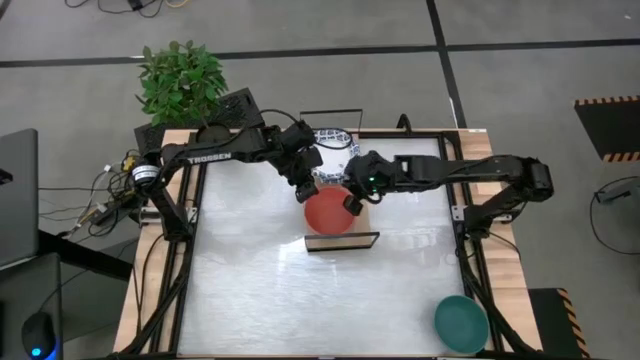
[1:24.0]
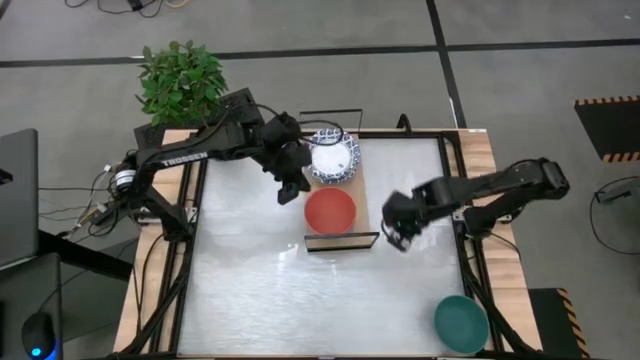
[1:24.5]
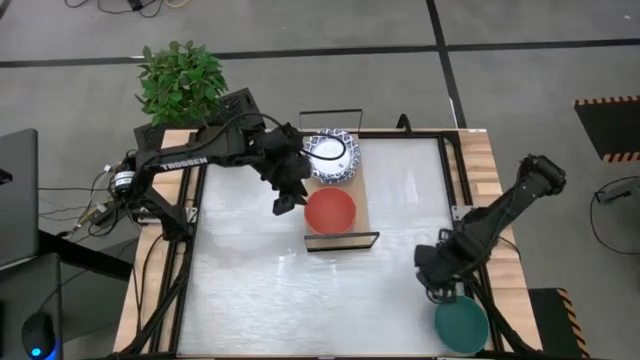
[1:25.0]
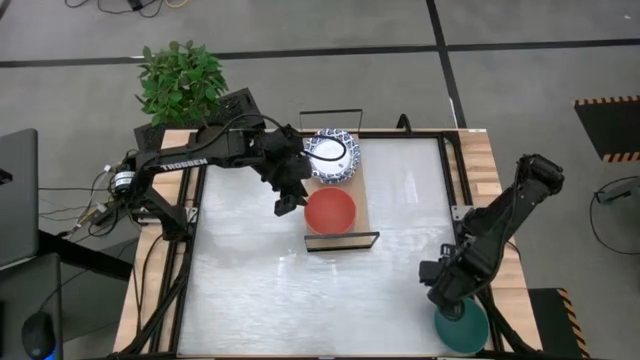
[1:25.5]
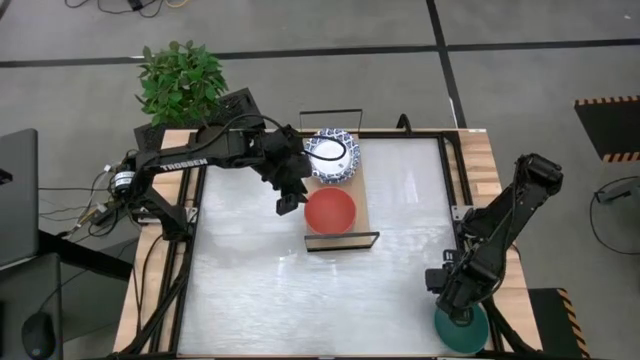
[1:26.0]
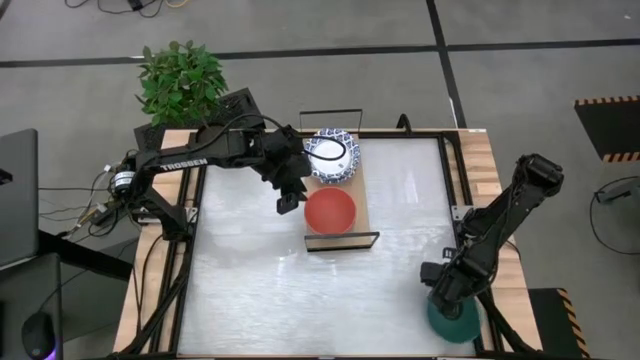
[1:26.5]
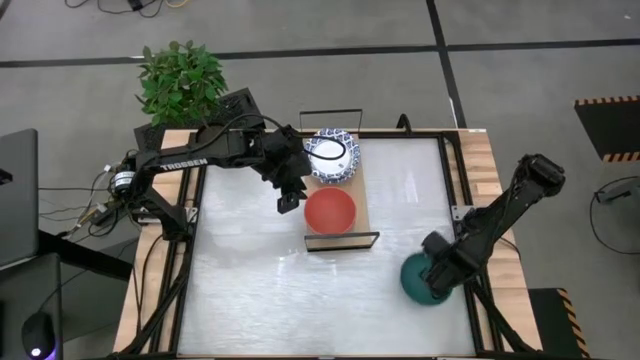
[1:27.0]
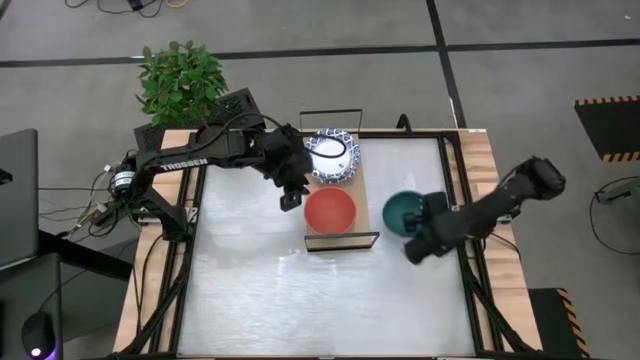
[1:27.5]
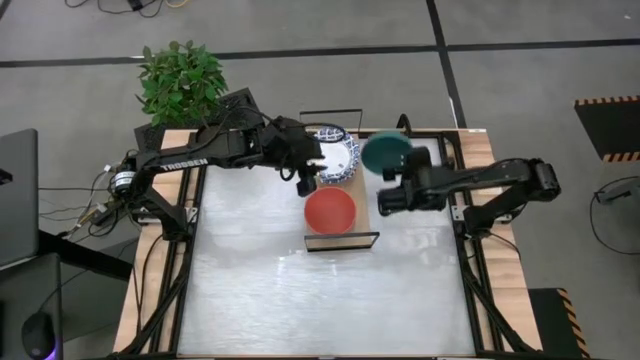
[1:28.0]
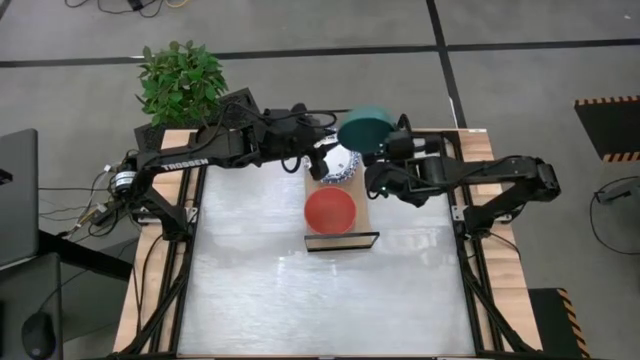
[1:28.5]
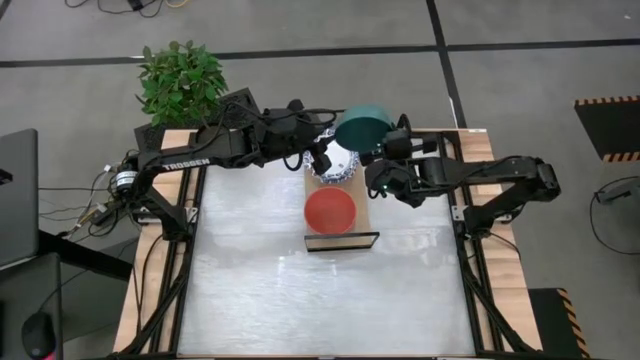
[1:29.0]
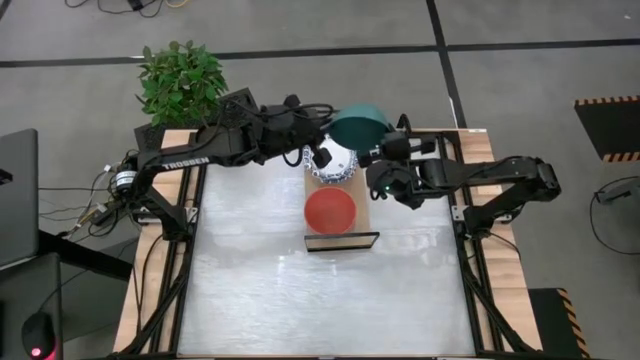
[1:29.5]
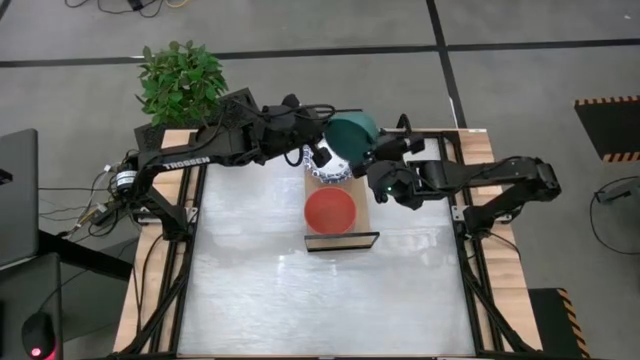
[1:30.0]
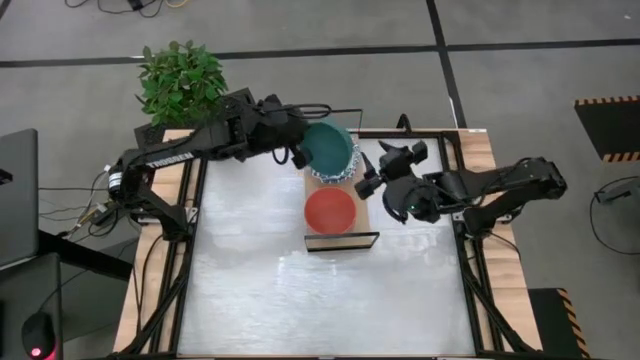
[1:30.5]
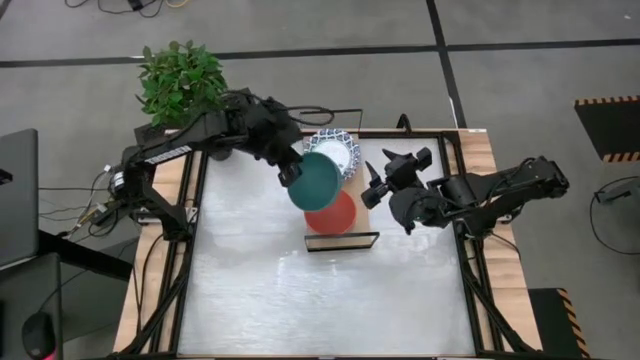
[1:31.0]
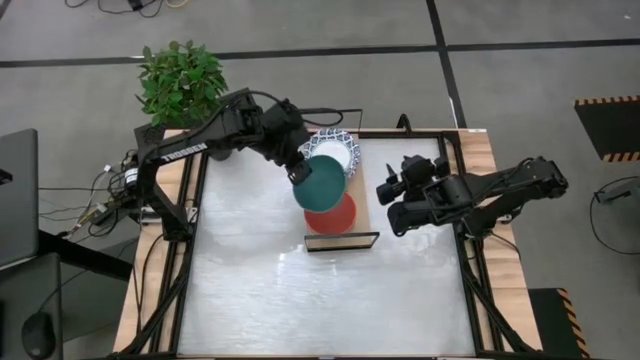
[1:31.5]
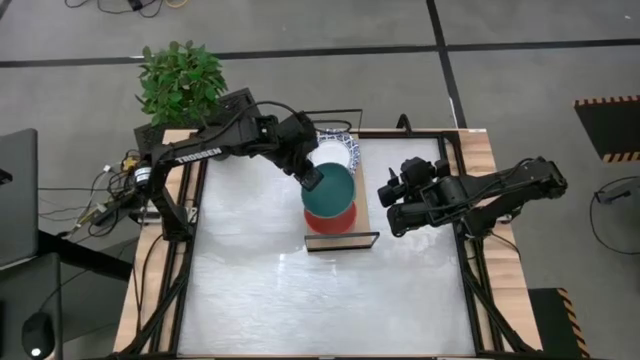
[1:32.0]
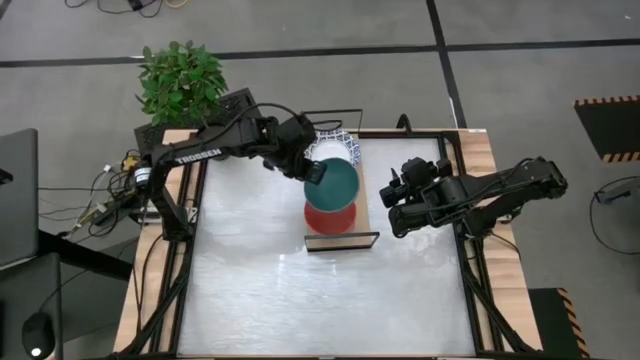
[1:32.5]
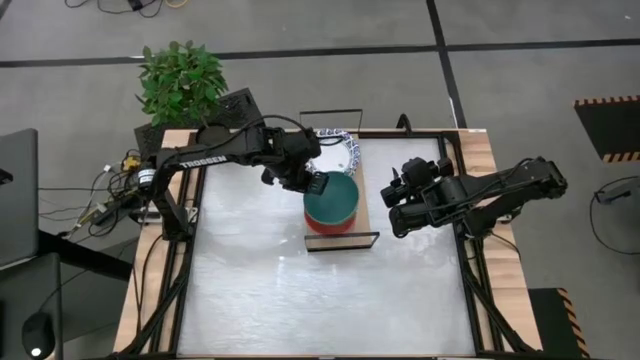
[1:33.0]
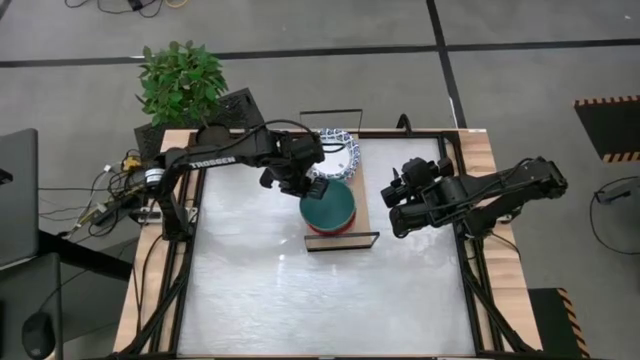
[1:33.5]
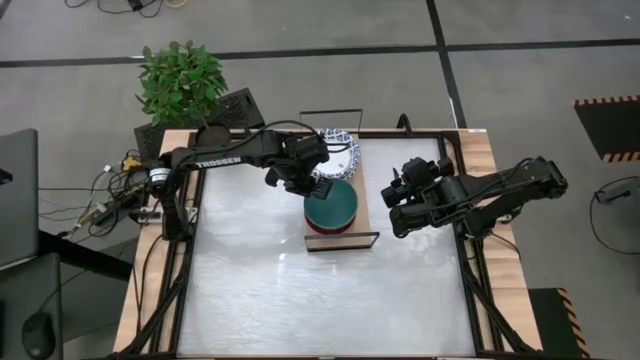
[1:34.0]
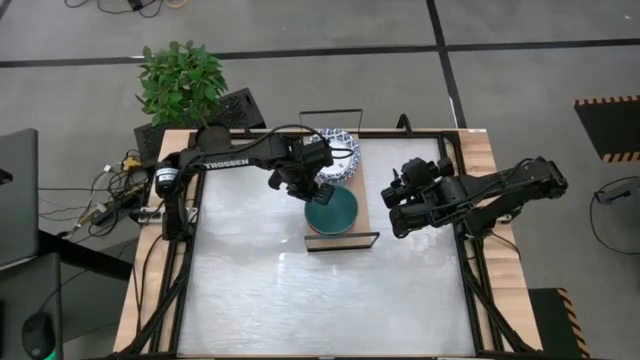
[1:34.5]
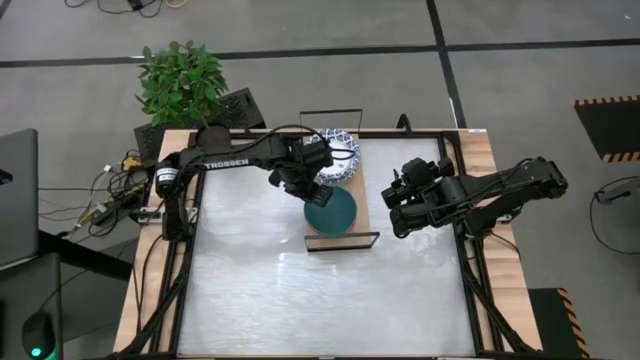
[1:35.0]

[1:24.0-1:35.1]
Task: Place and stack bowls onto a shelf
Stack the green bowl on top of the orange bowl on the shelf

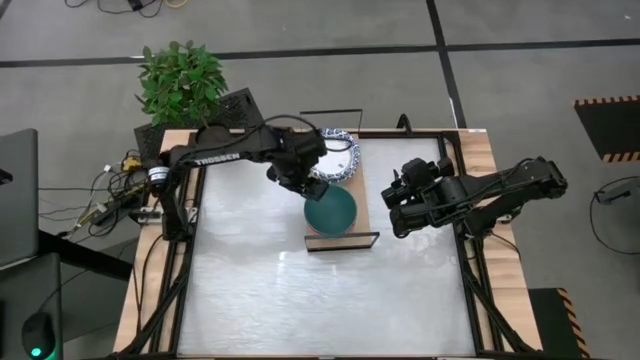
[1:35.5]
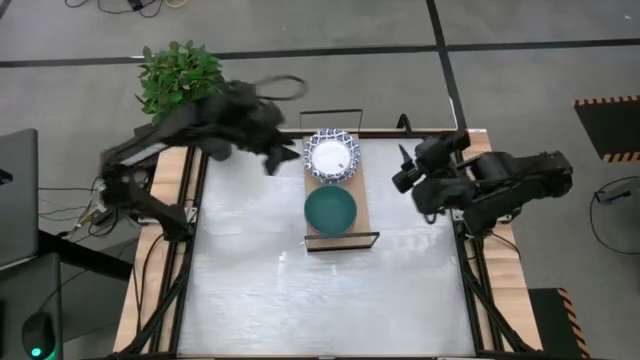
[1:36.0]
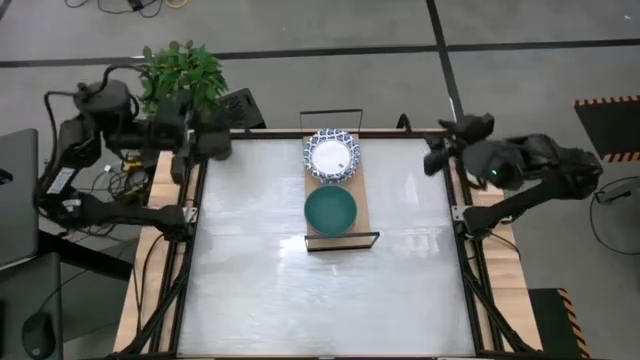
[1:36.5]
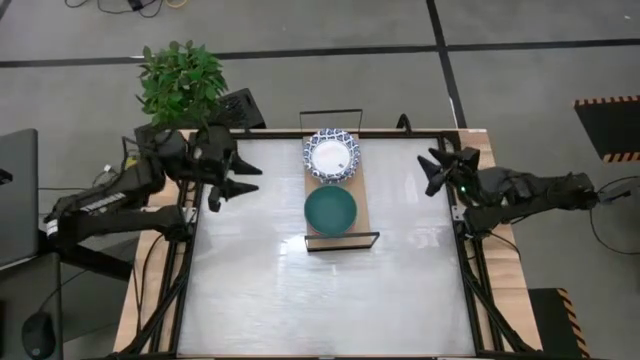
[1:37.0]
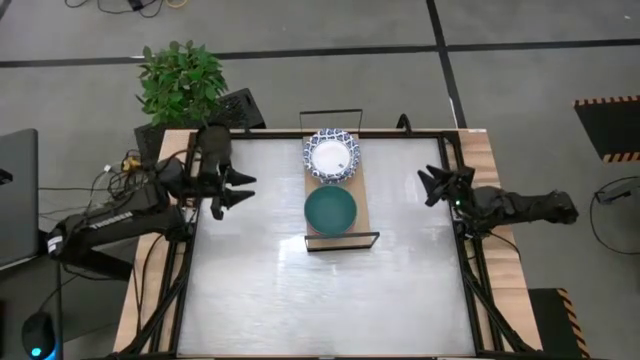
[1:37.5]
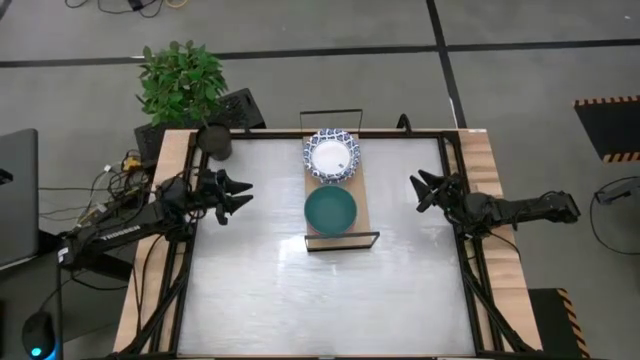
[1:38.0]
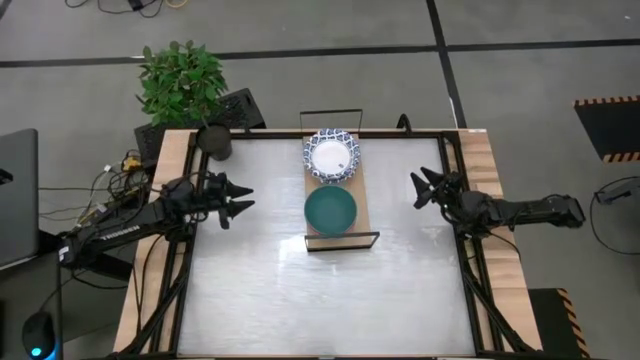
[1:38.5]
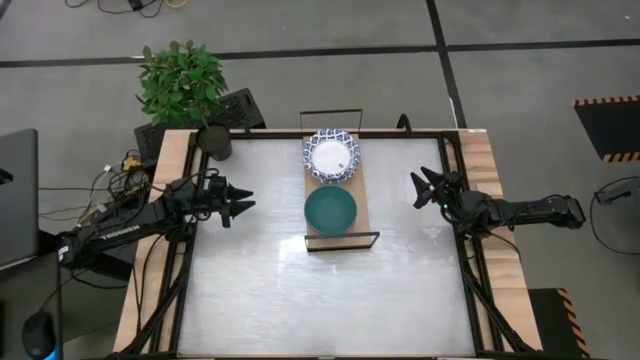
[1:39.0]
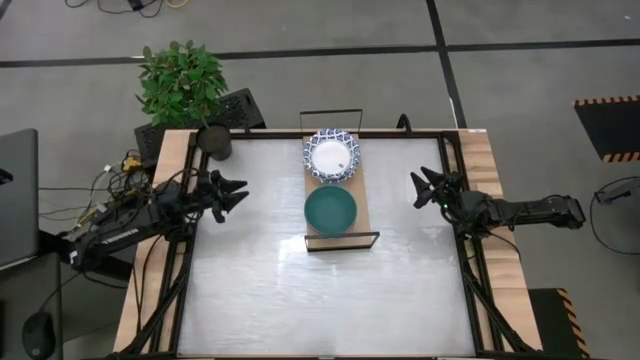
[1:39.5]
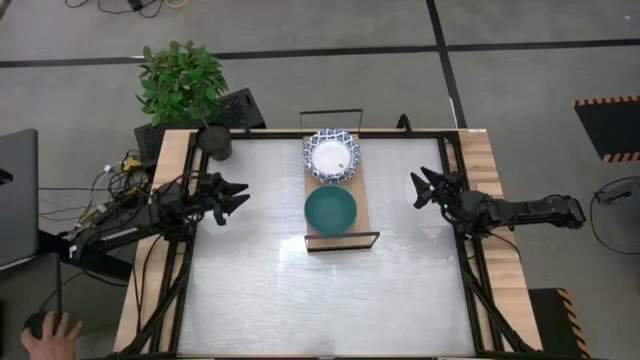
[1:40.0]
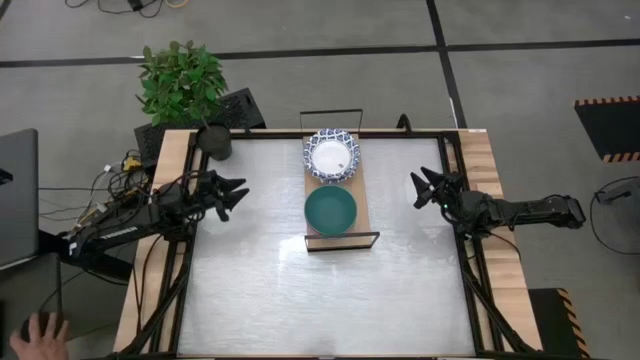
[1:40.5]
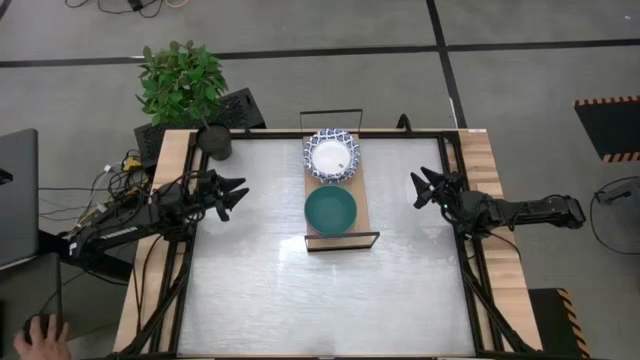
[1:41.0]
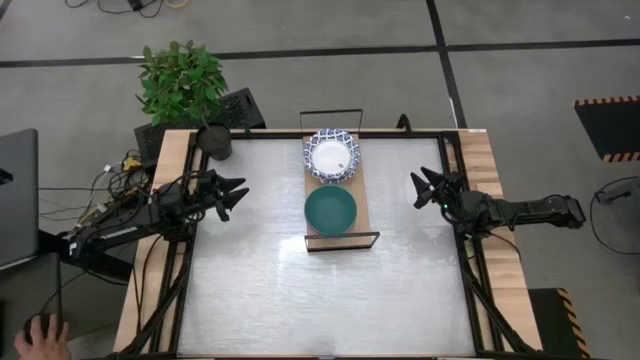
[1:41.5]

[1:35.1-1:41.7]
Return to Home Position

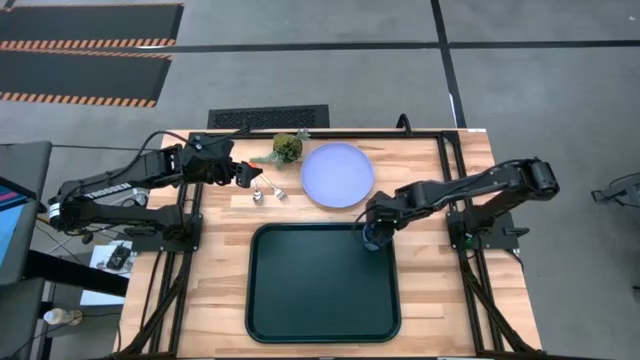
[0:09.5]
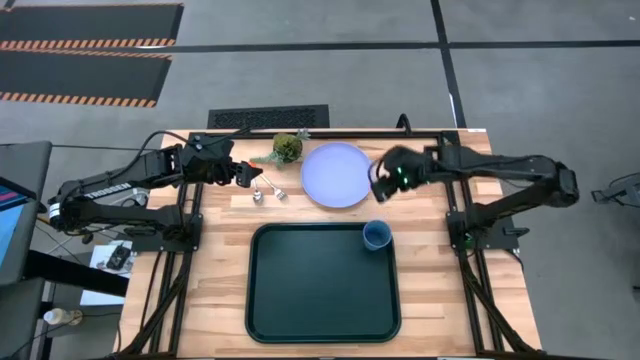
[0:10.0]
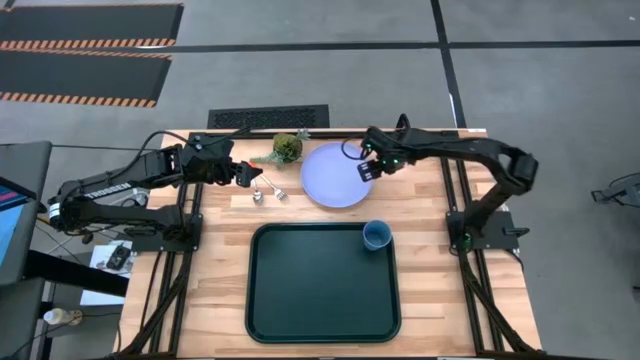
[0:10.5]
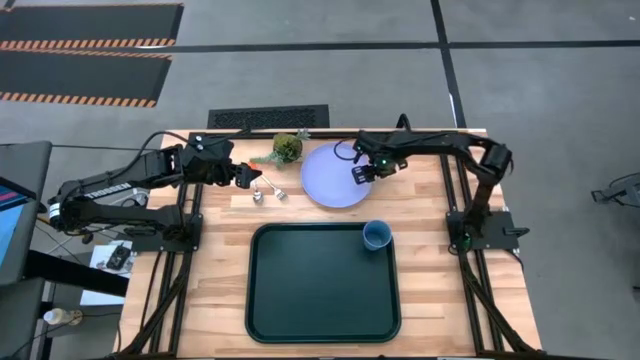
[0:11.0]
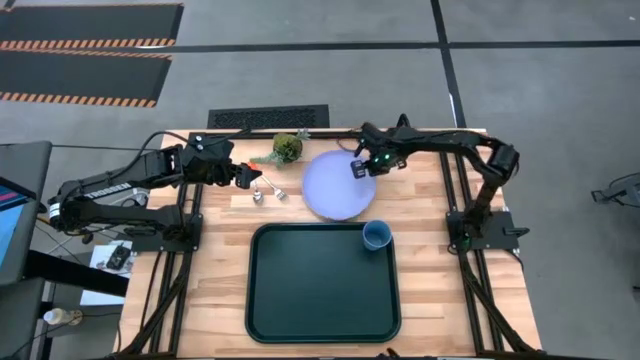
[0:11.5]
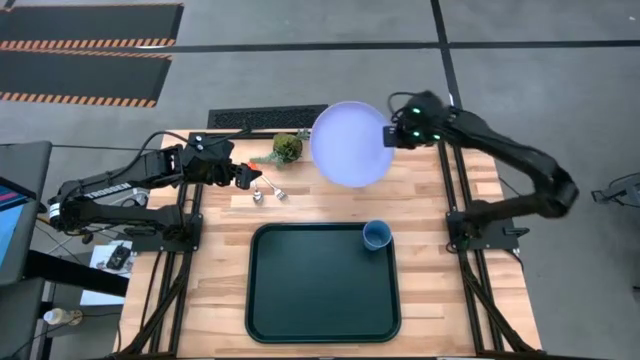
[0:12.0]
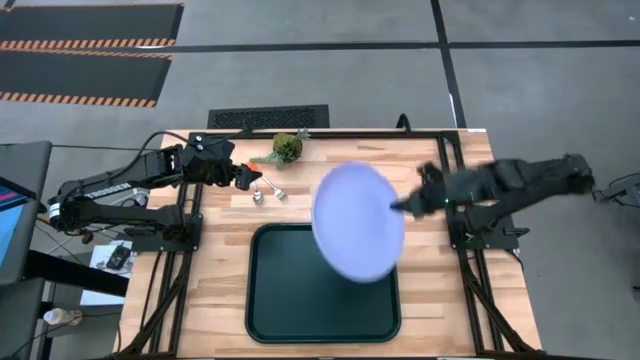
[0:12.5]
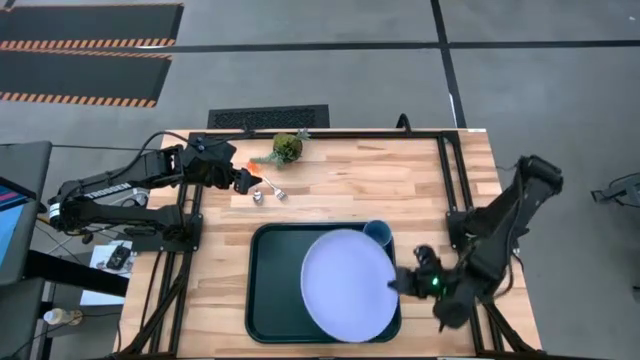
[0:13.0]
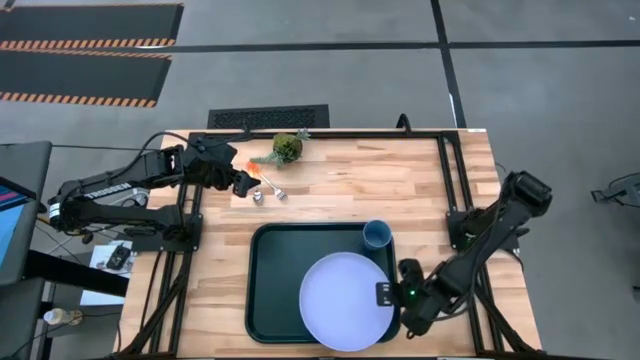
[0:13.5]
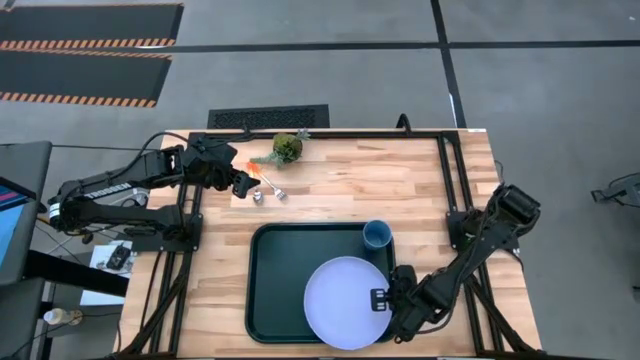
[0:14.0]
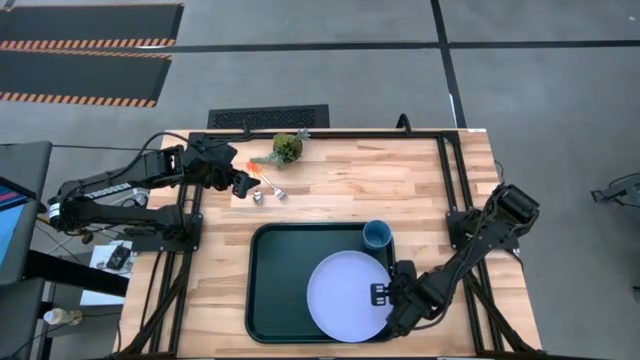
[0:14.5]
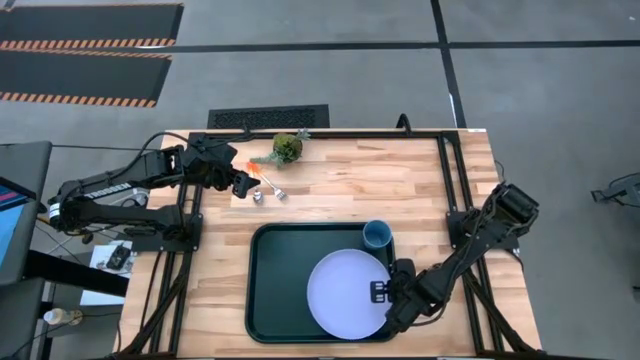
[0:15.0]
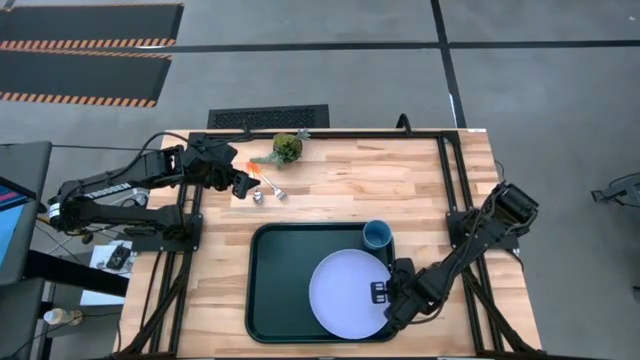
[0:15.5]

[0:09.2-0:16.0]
Task: Pick and place plate/cup/fork/spoon on tray
Put the violet plate on the black tray to the bottom of the blue cup
